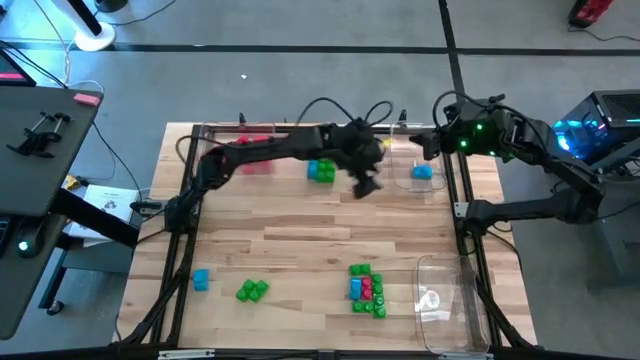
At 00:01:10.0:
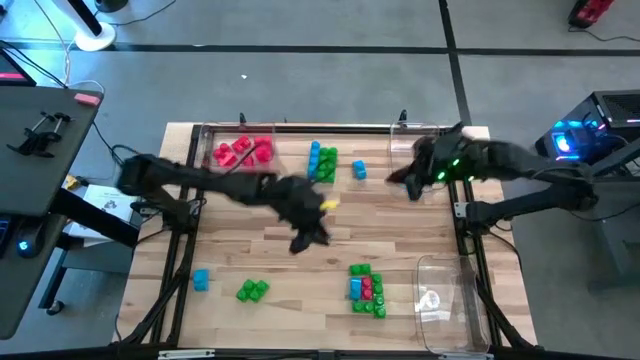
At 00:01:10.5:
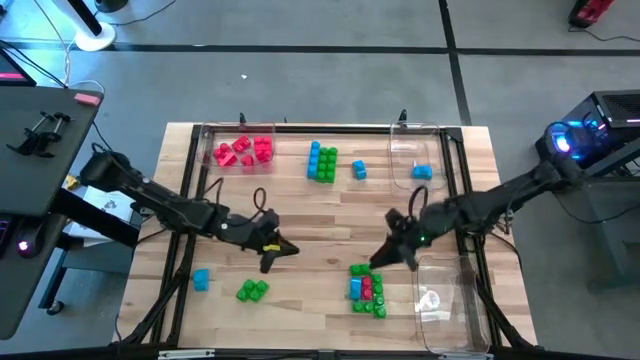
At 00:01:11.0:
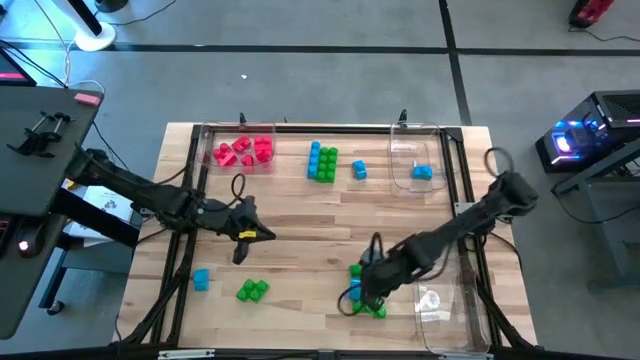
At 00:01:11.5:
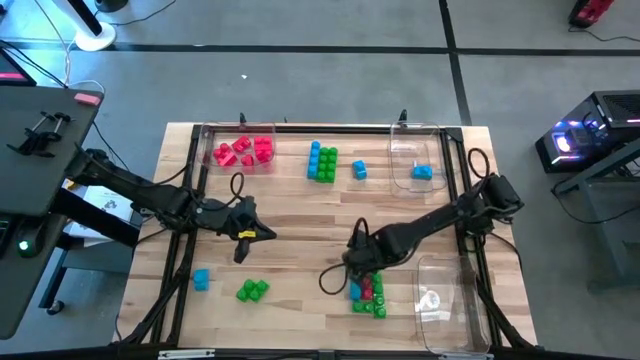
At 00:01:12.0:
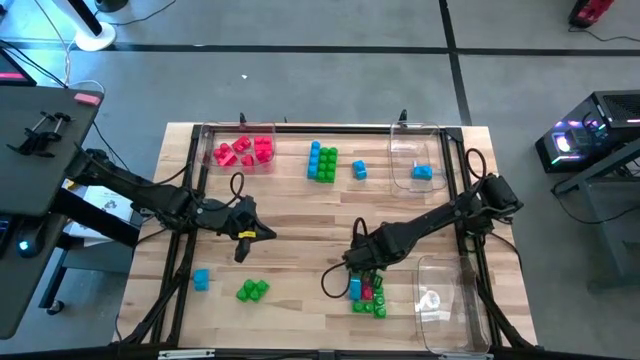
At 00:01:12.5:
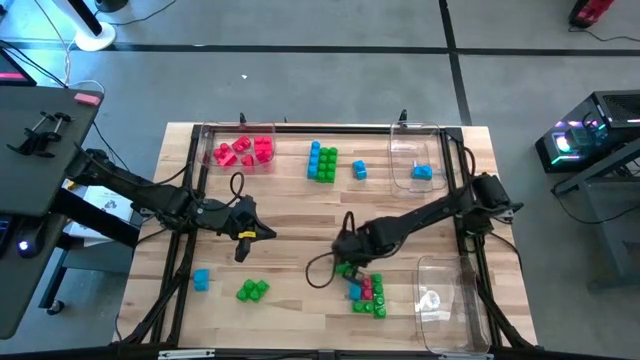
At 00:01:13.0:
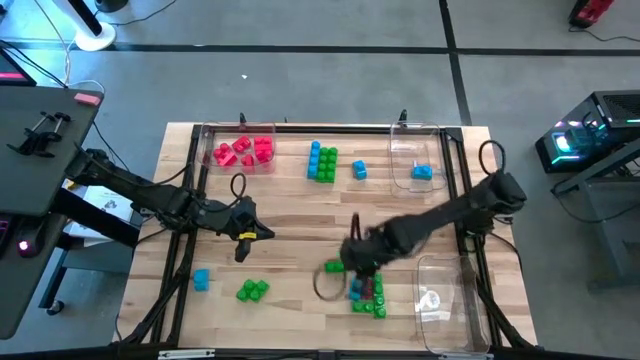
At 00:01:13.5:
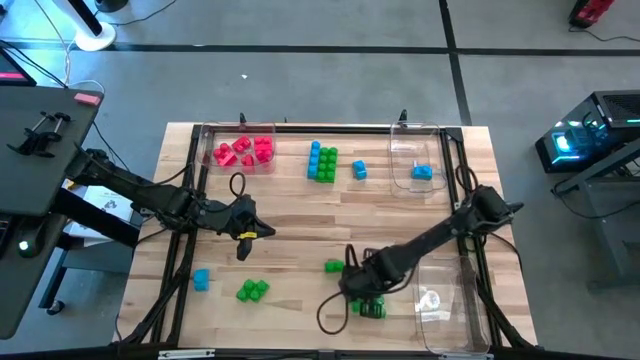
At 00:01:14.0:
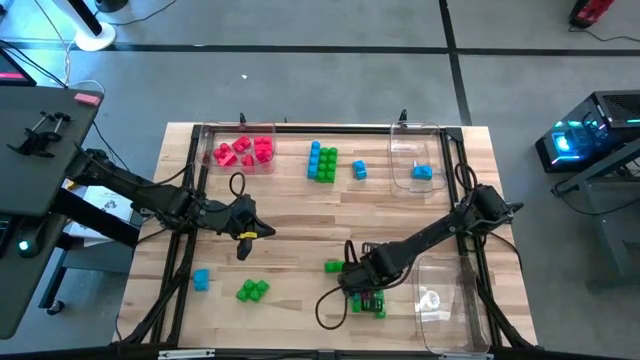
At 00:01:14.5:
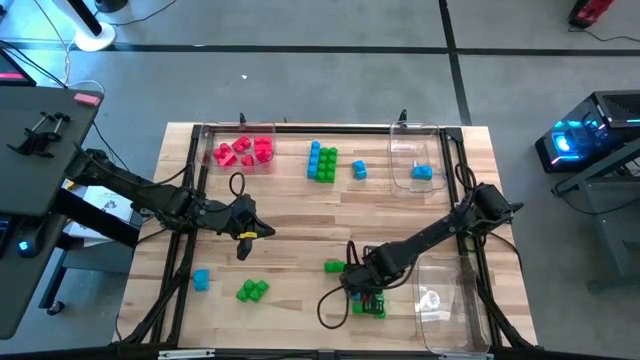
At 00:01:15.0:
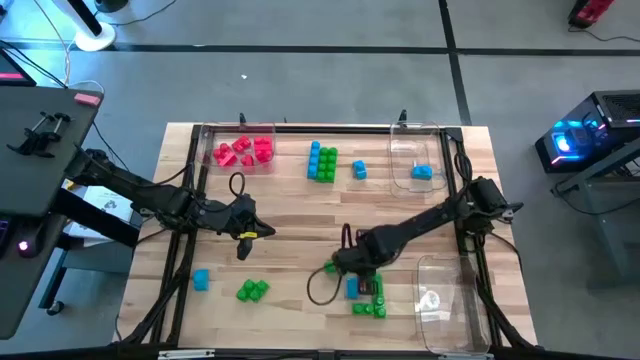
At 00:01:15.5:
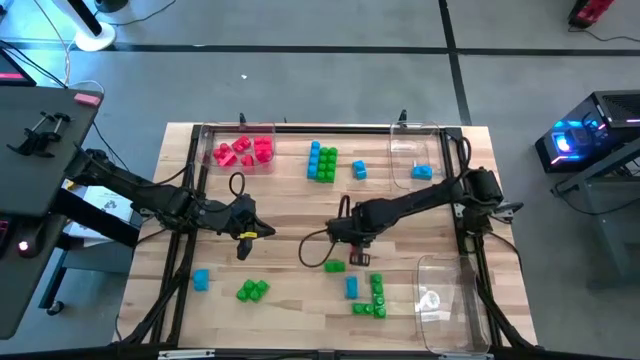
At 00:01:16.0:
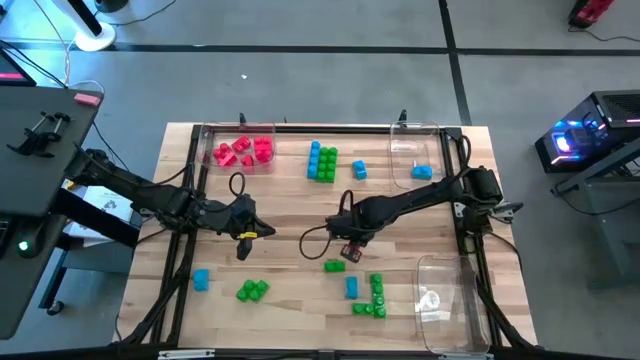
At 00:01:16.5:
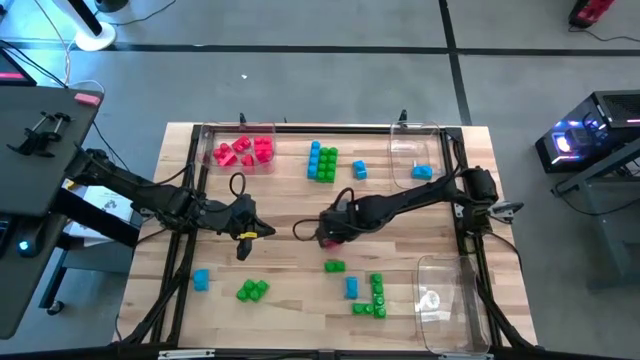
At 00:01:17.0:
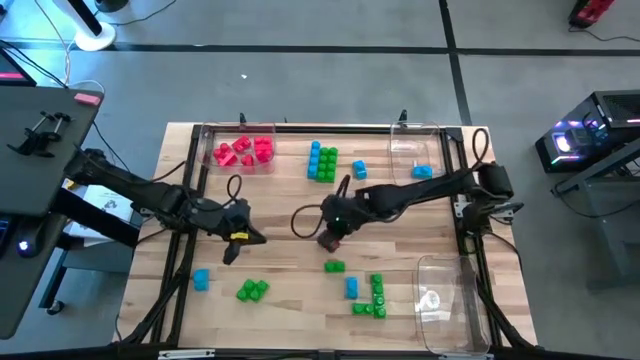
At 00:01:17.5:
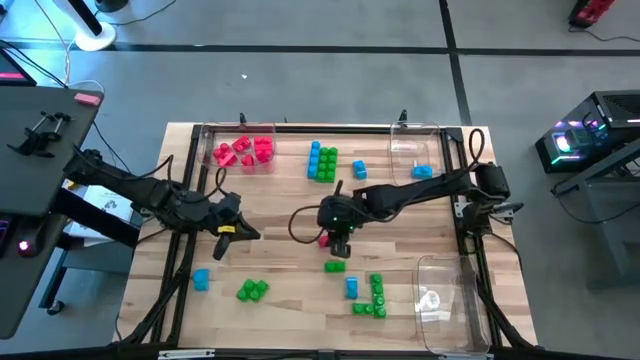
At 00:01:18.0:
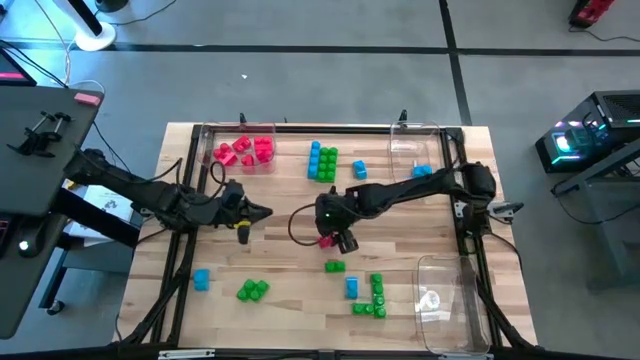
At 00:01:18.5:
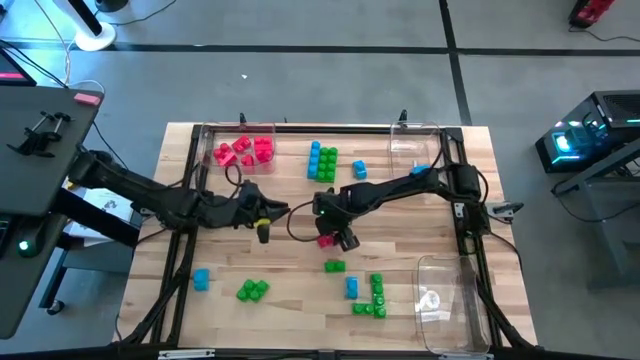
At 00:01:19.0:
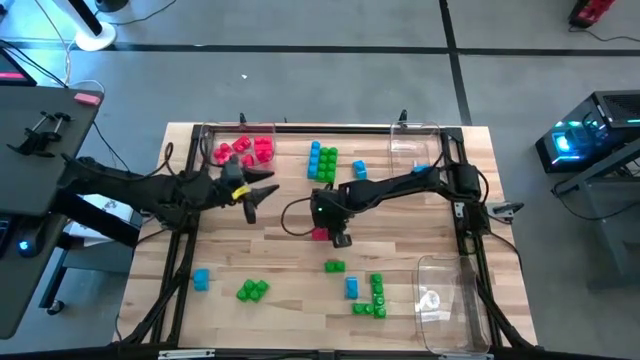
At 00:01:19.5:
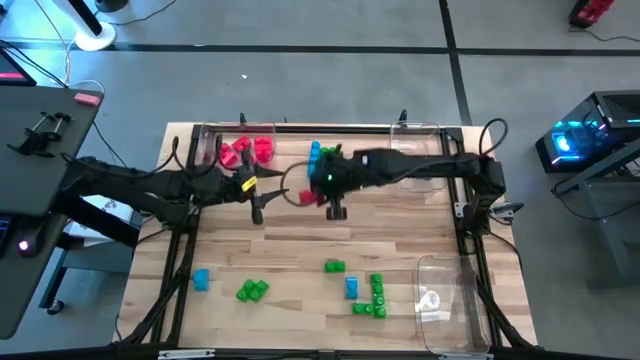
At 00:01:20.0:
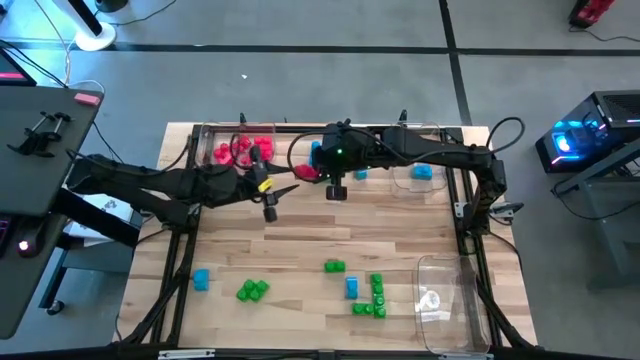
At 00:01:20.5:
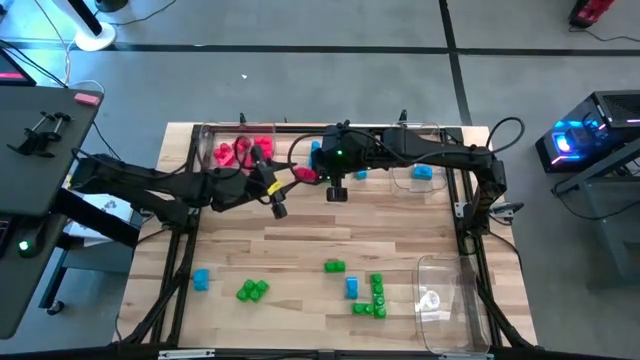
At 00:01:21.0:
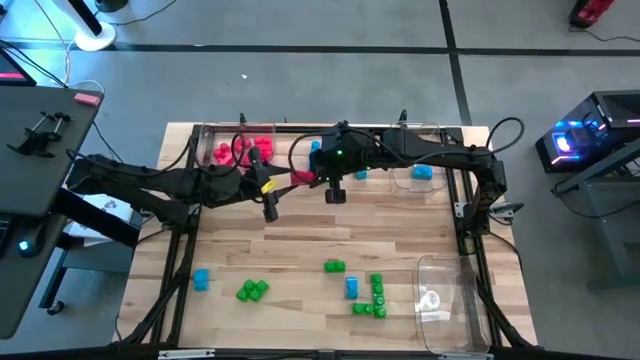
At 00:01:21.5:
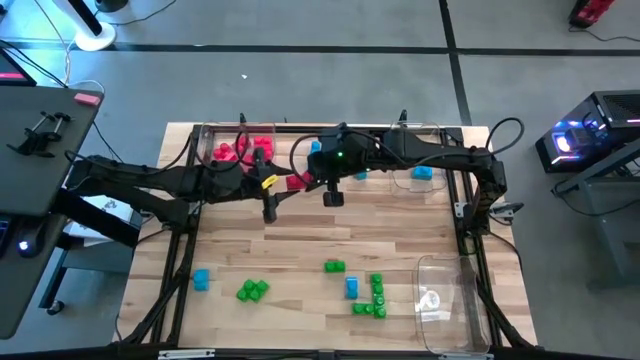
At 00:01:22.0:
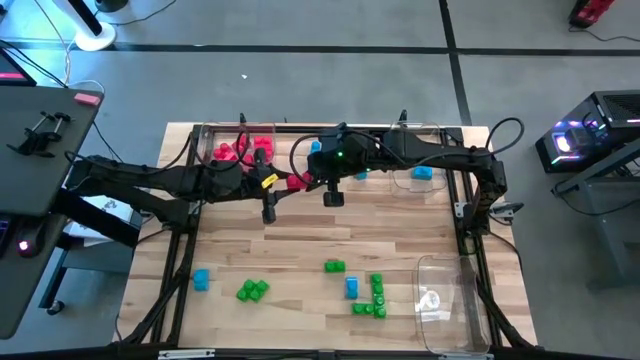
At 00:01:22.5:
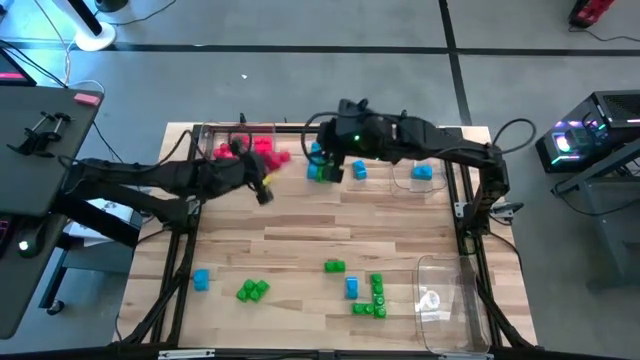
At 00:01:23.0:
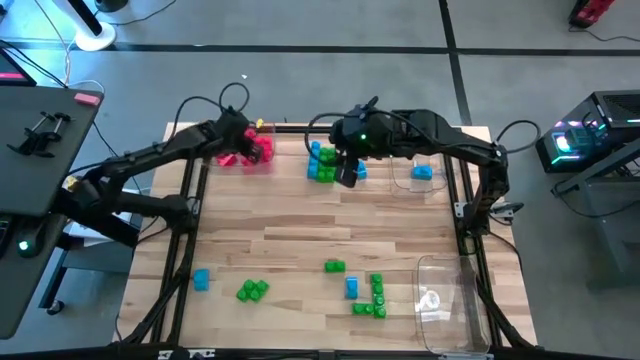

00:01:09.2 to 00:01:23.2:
Task: Sort blocks
Put the red game piece into the top left transparent bin

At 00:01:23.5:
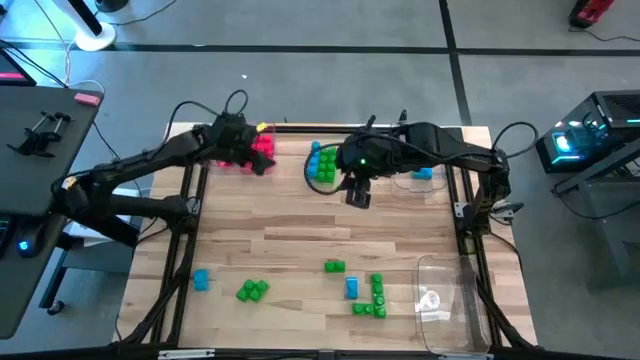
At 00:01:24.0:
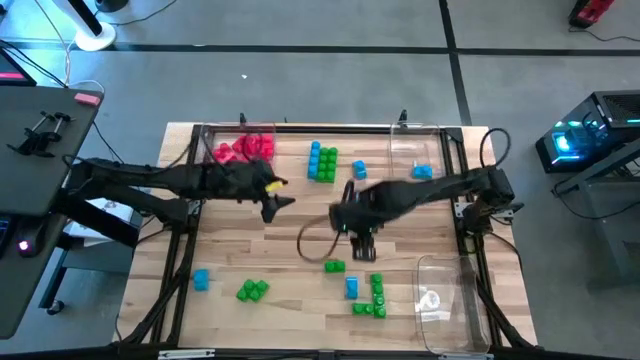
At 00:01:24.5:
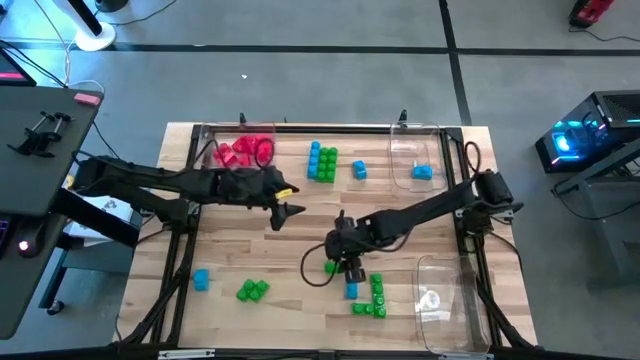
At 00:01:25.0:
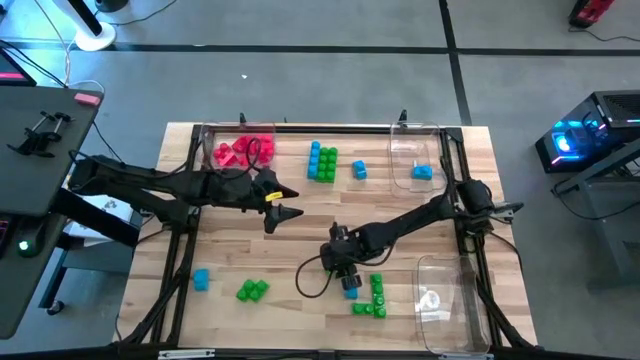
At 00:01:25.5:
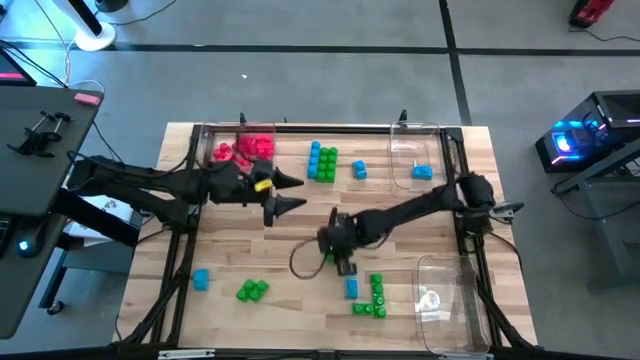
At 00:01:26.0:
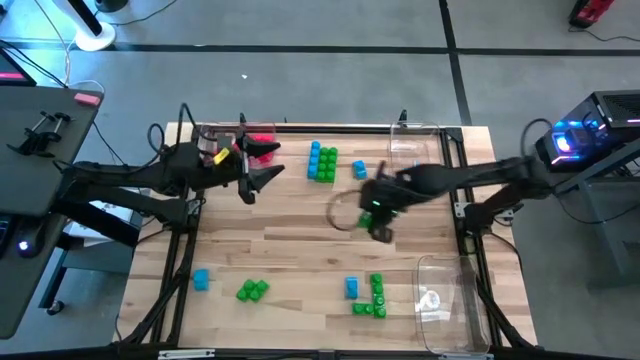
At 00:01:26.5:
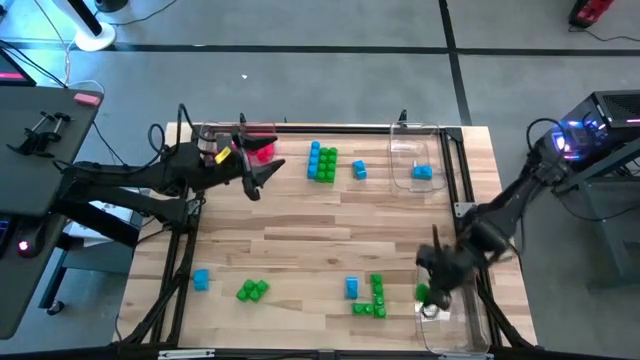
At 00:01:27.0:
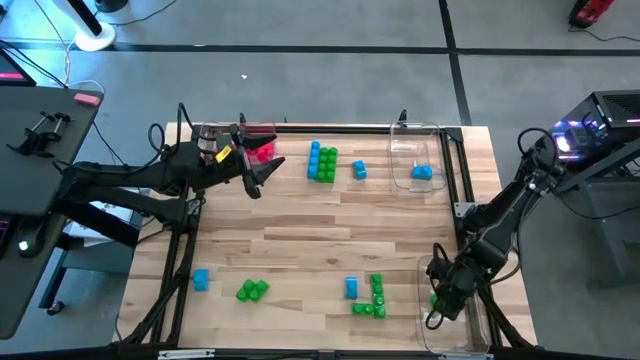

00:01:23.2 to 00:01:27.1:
Put the green game piece into the bottom transparent bin

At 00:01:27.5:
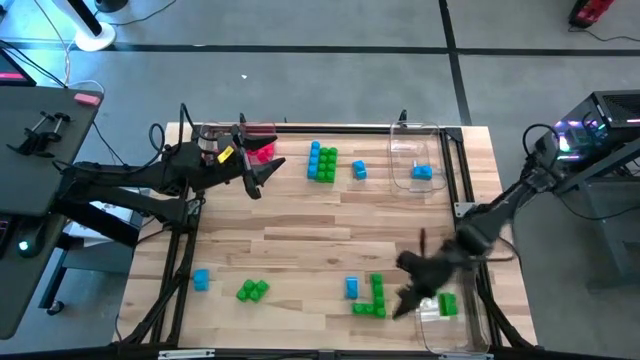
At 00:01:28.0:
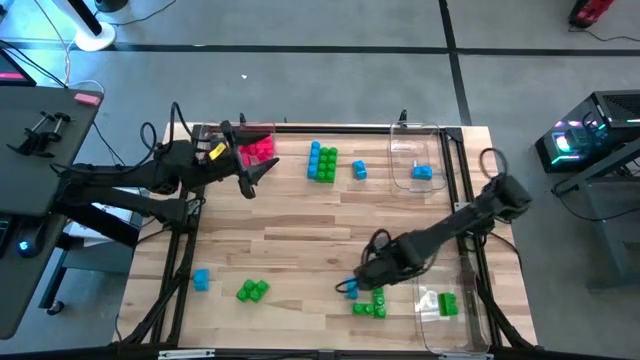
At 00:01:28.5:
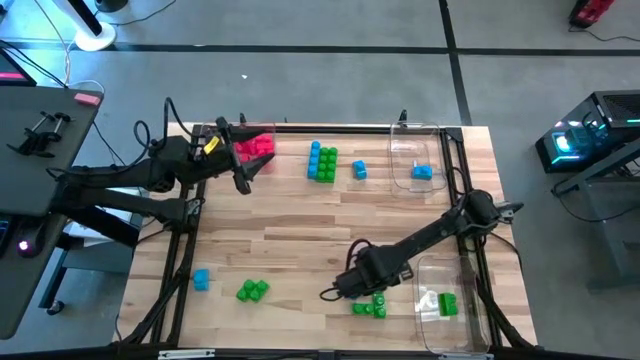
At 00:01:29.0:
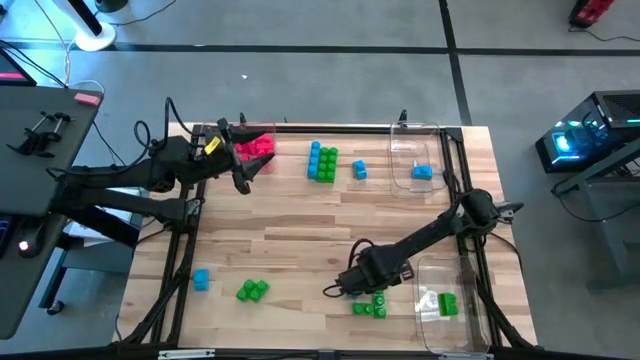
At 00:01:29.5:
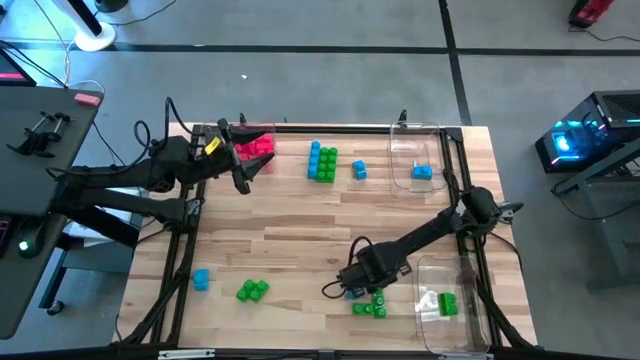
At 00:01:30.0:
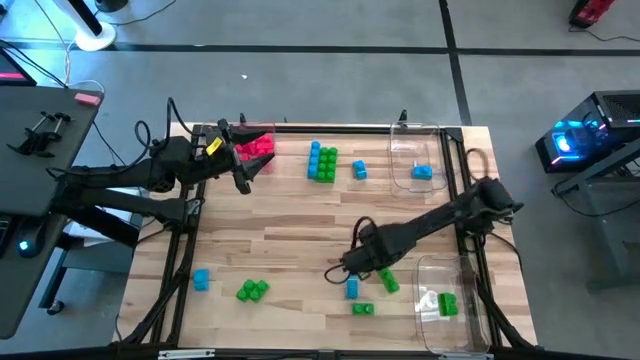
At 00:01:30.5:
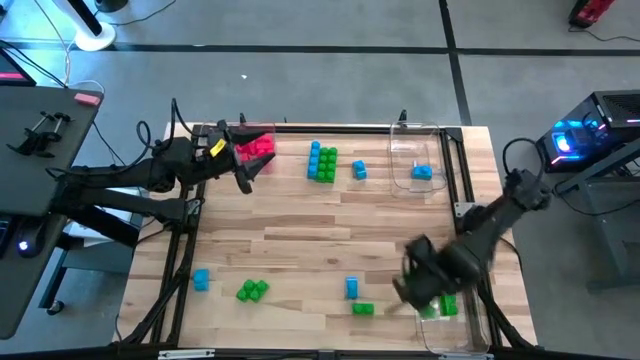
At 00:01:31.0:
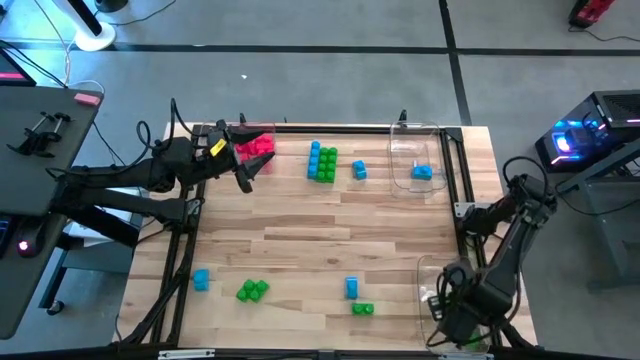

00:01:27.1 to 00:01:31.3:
Put the green game piece into the bottom transparent bin
